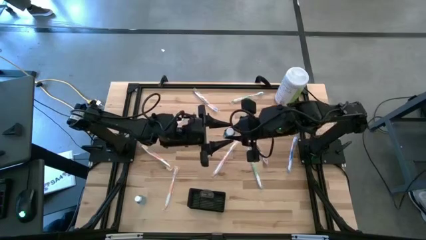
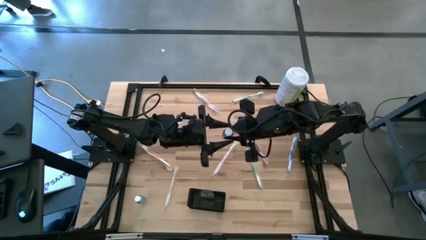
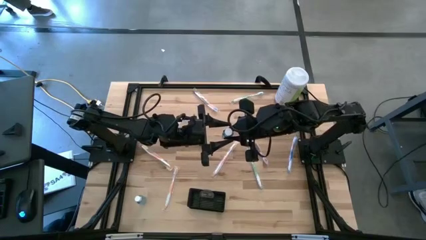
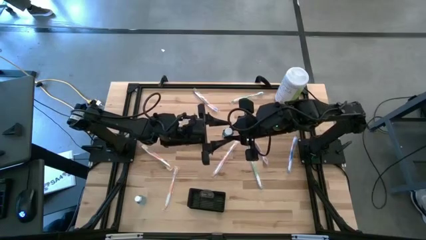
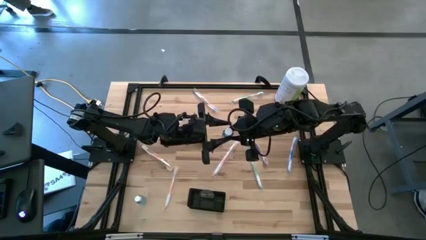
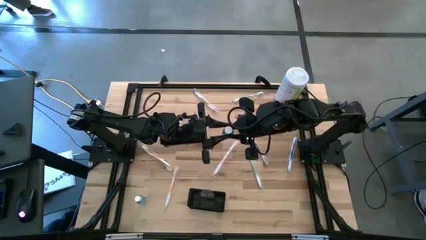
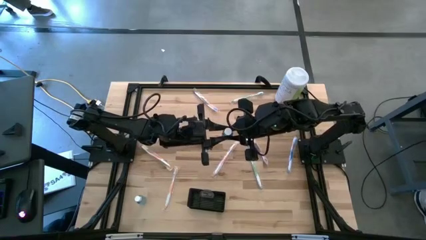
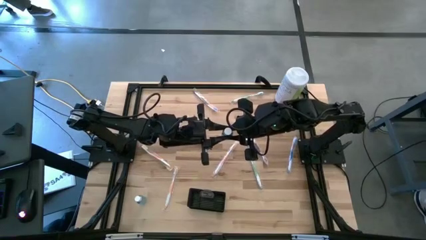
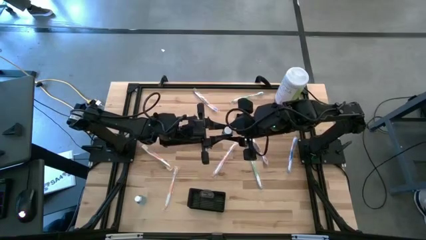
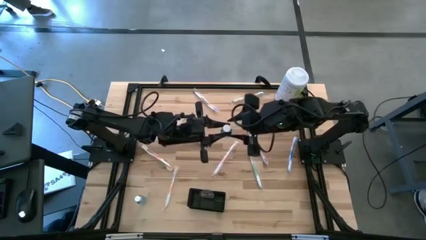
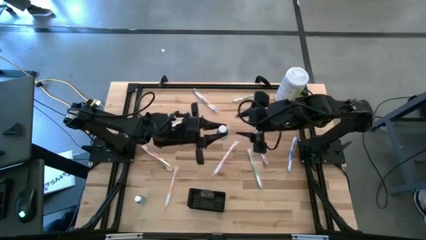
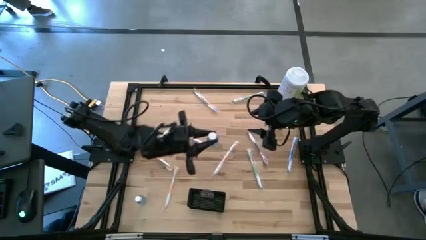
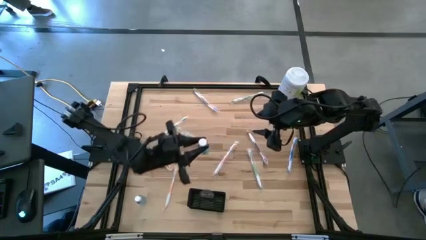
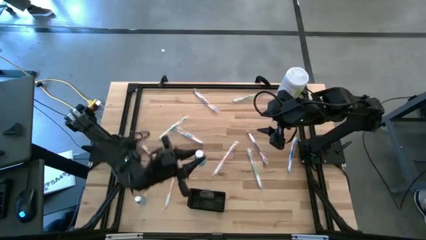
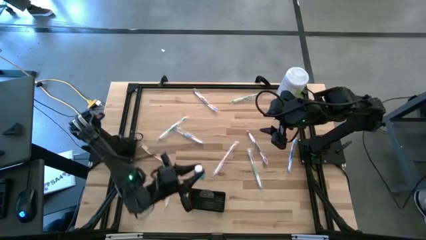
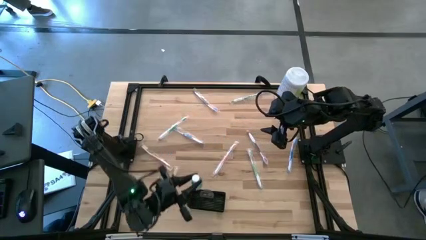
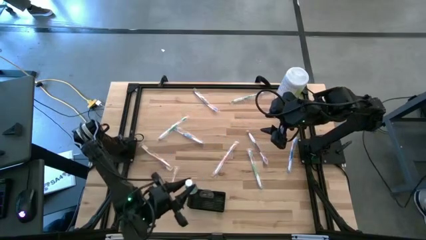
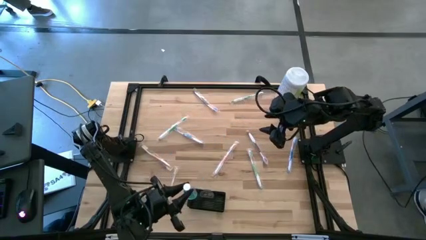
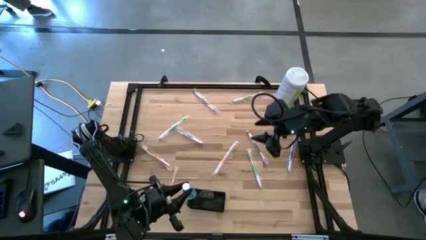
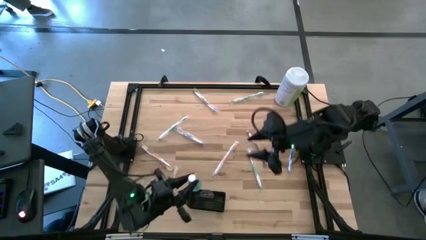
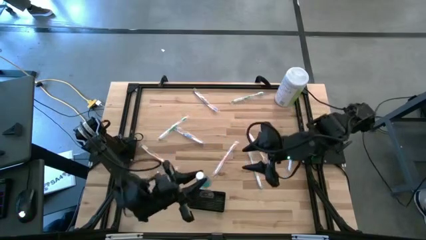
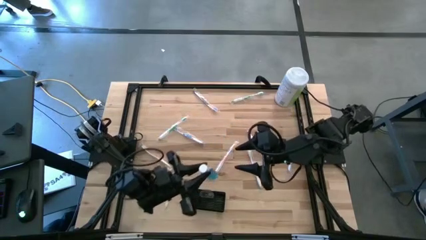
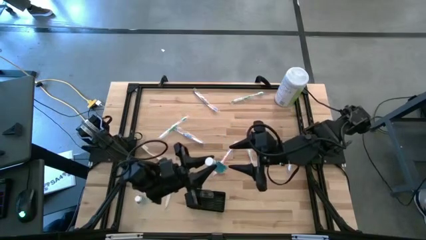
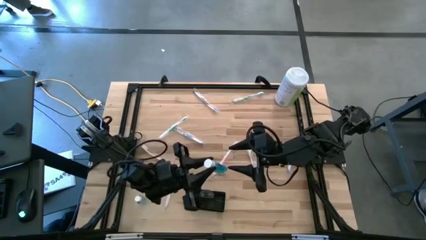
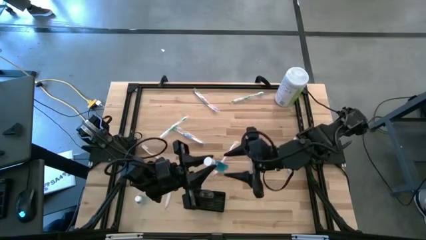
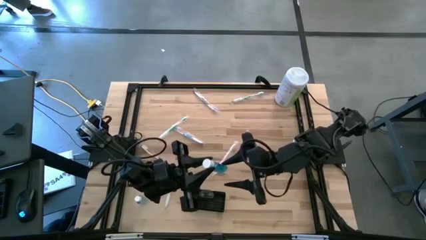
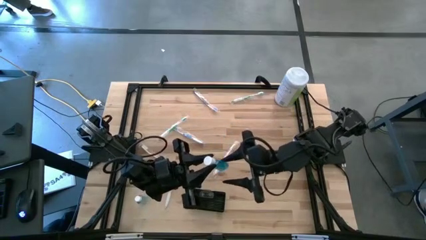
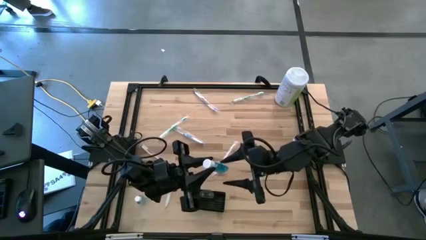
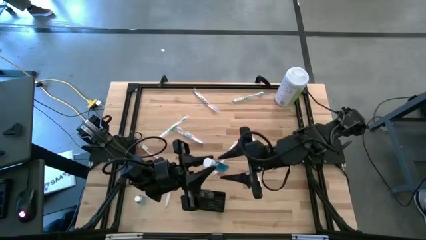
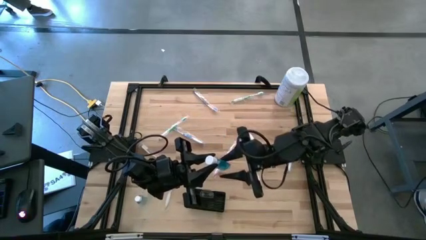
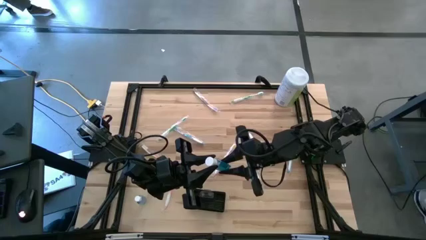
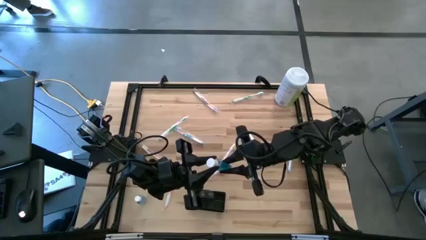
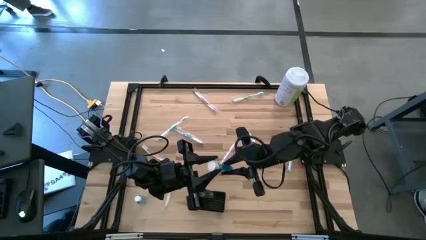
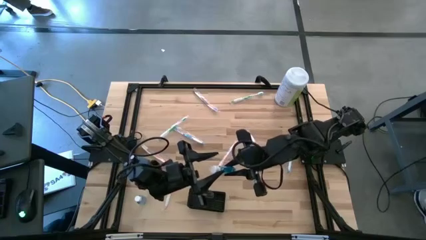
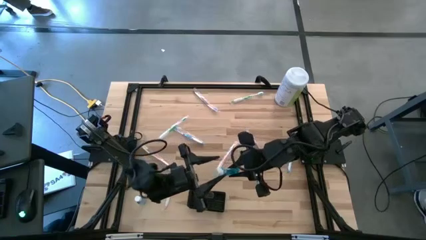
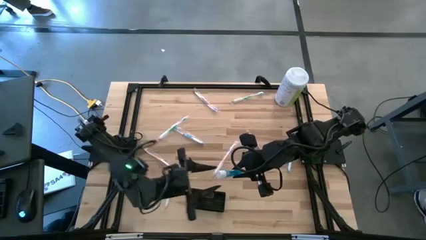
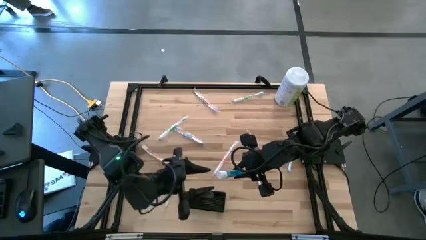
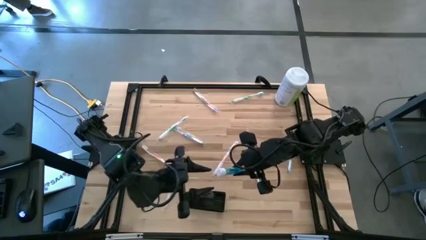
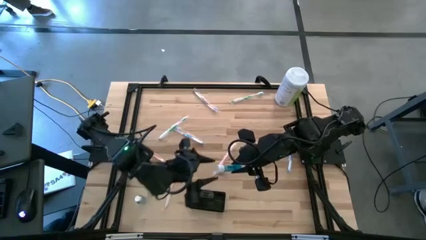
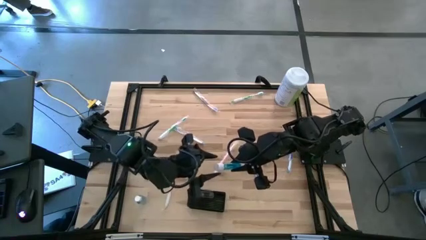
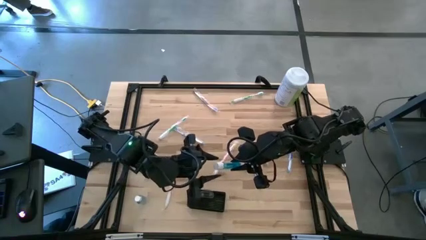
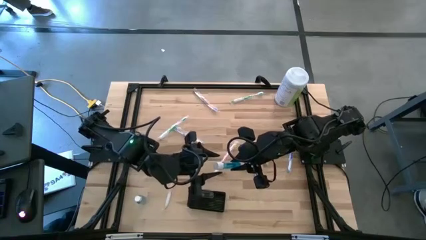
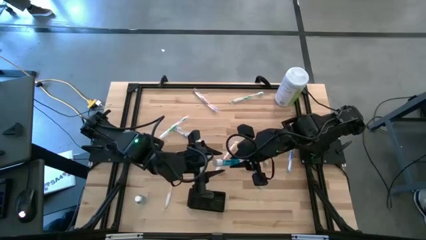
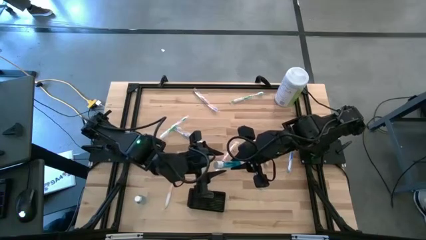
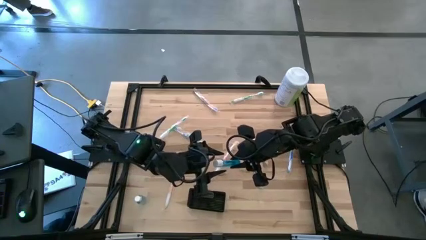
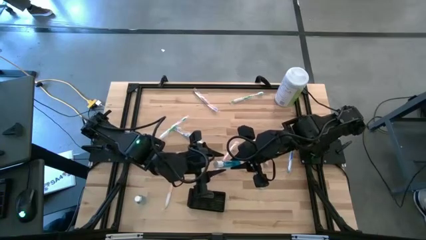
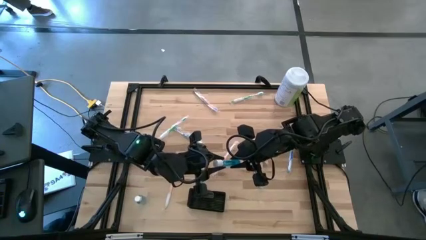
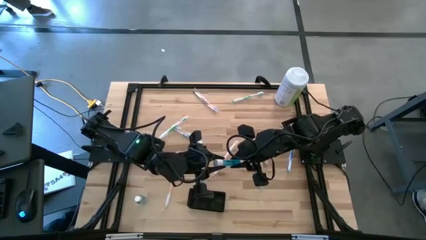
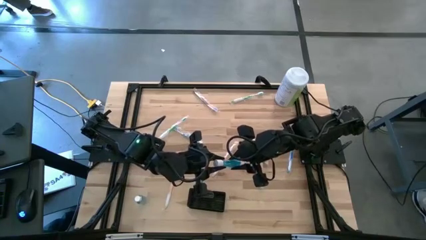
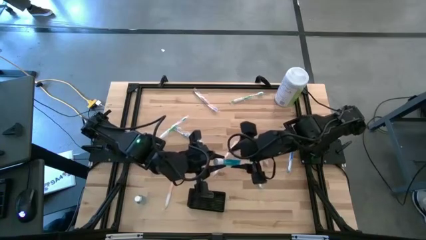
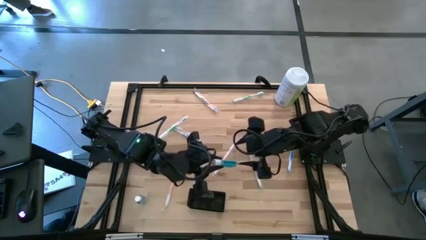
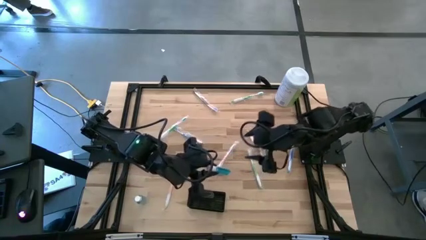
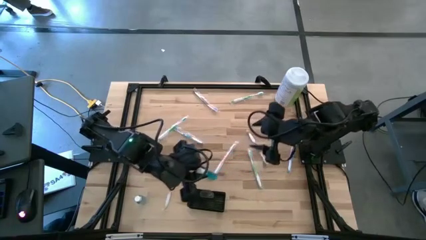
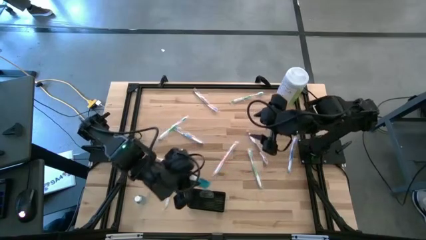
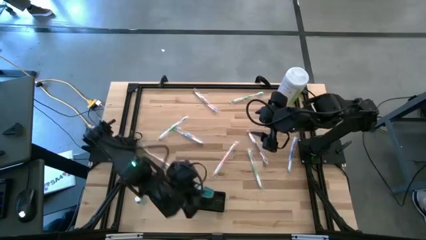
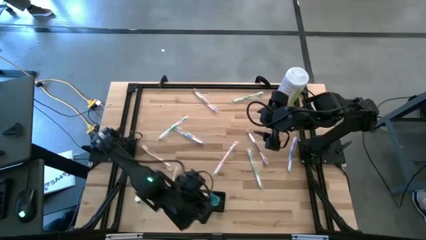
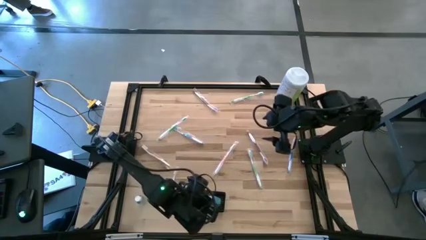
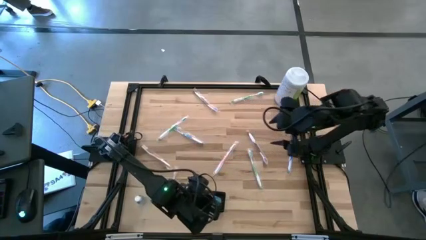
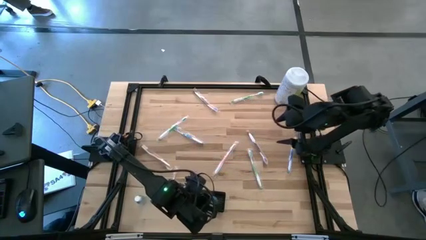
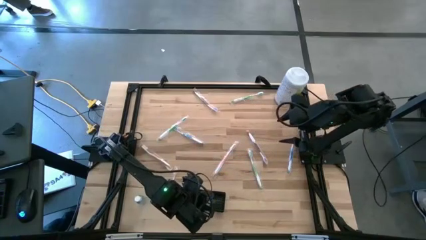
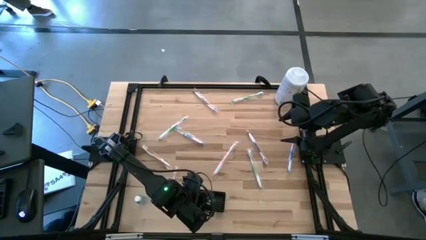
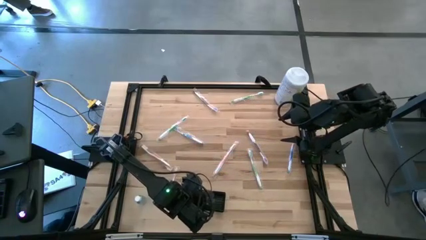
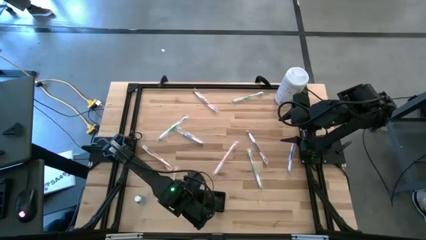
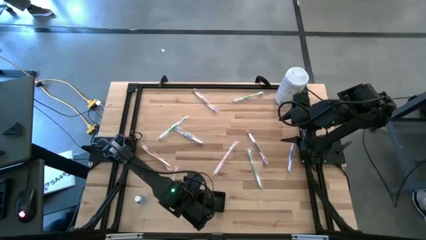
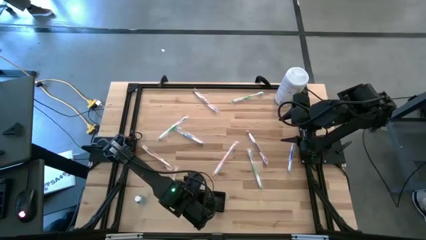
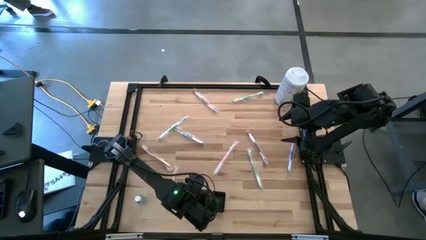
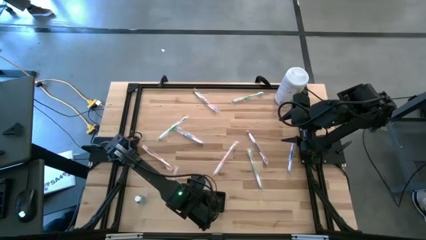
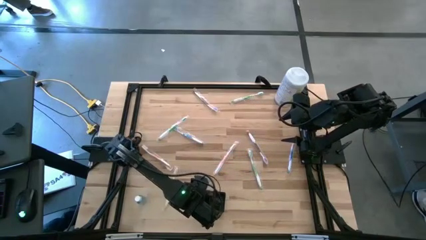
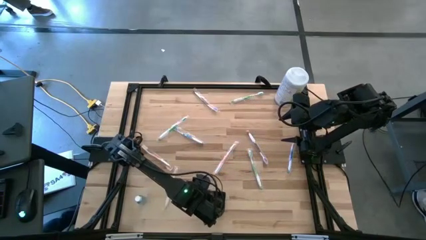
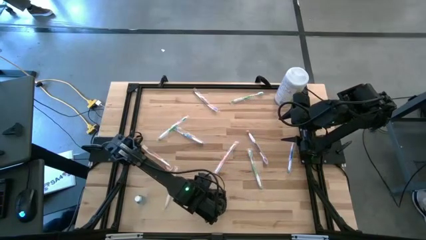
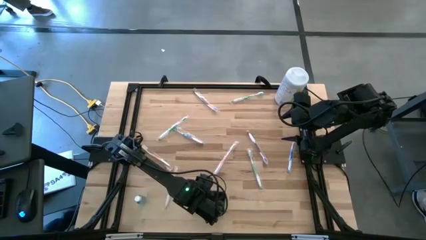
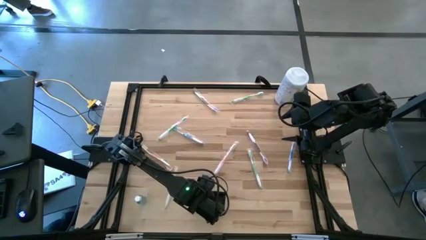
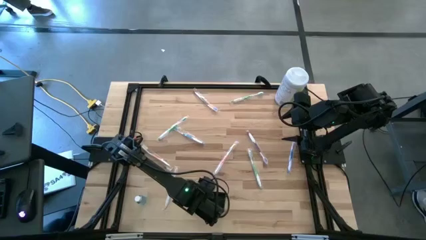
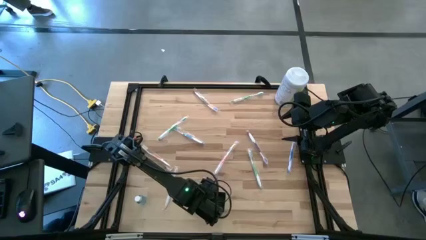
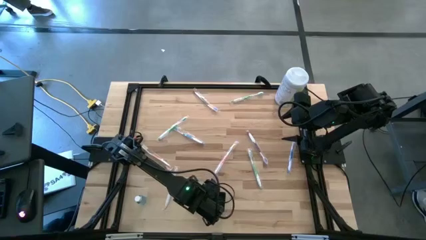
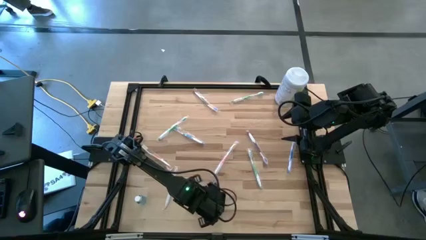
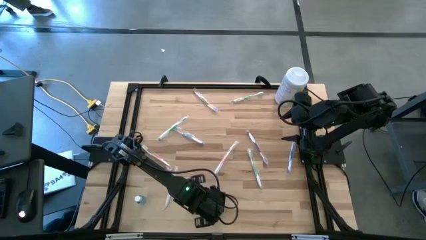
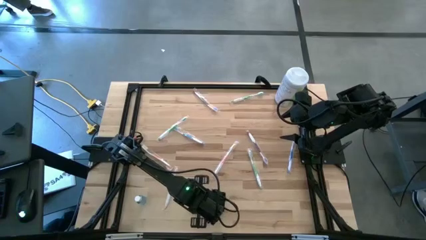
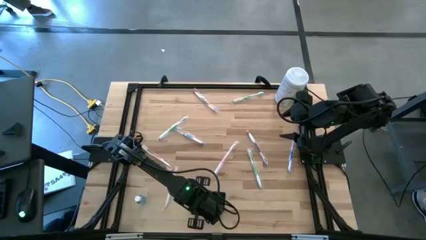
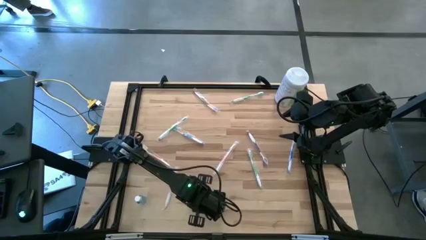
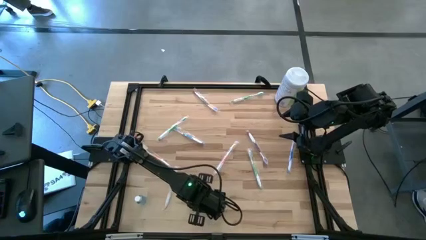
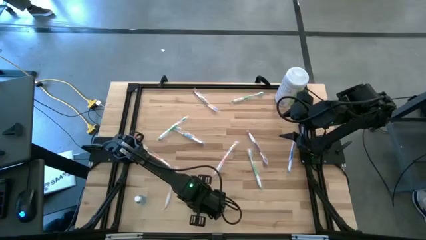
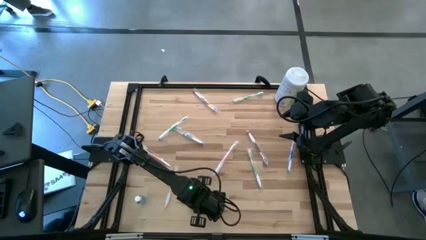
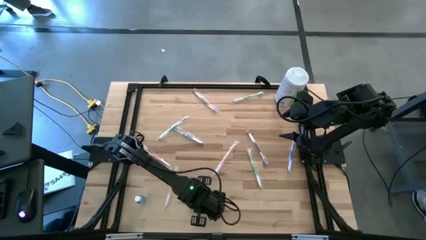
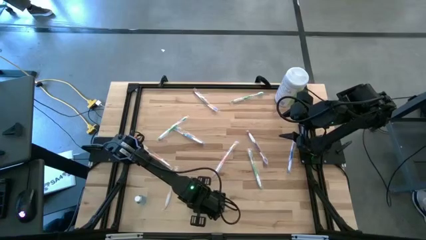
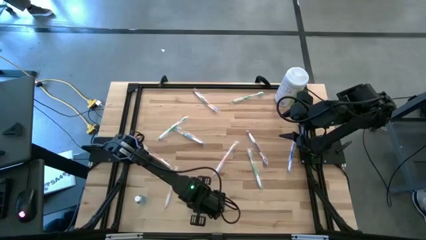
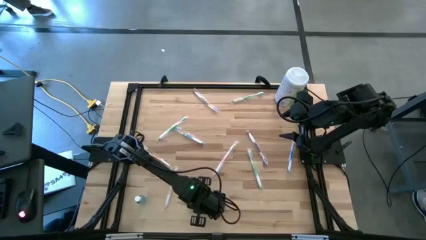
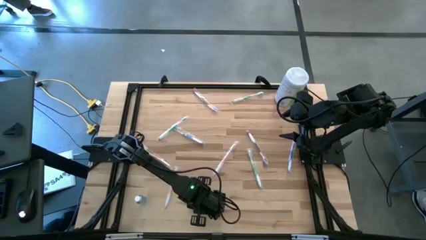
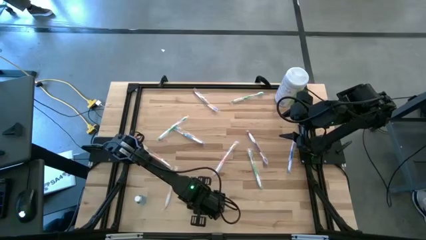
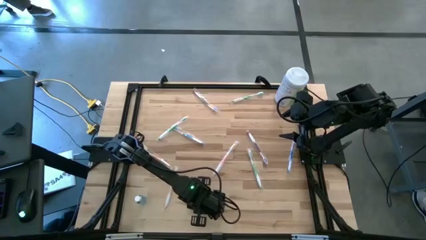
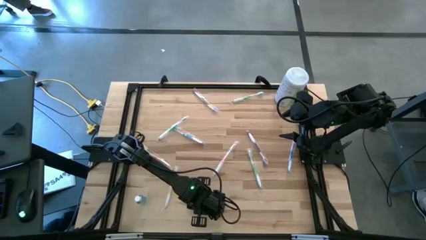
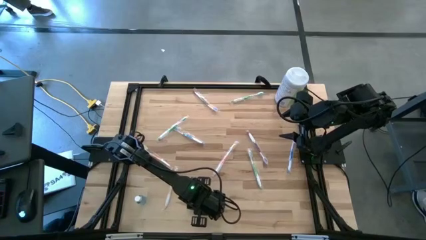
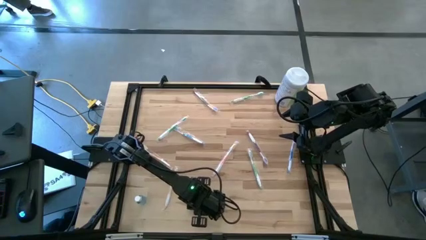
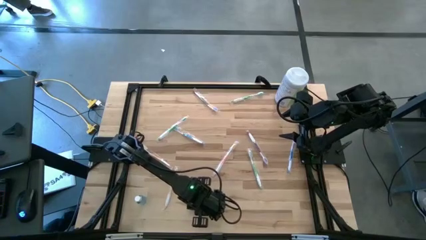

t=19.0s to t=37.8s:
Task: Pick & Place toothbrushing station
Put the right blue mouthwash into the black wire organizer
